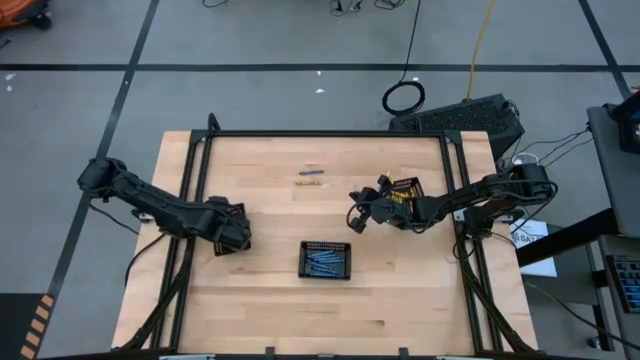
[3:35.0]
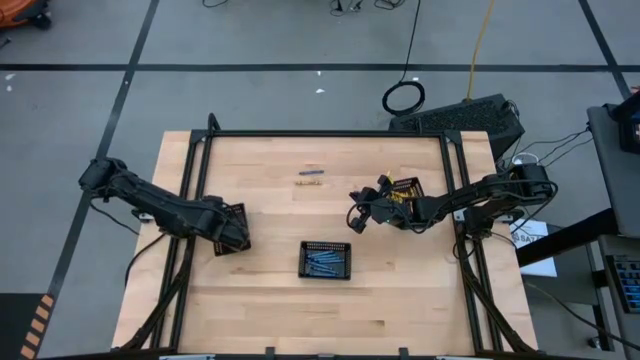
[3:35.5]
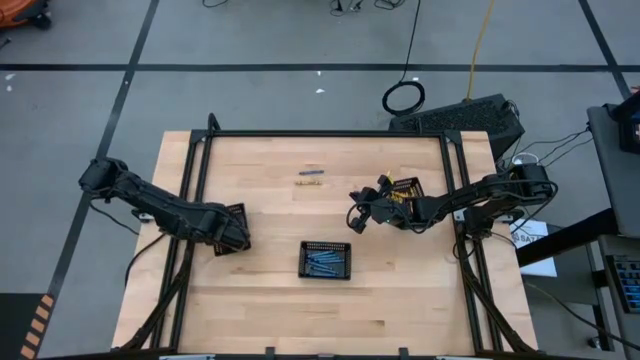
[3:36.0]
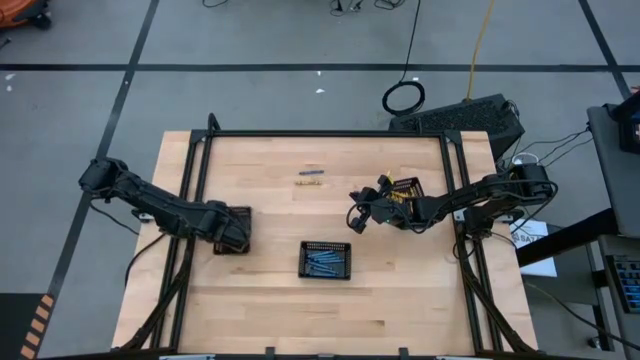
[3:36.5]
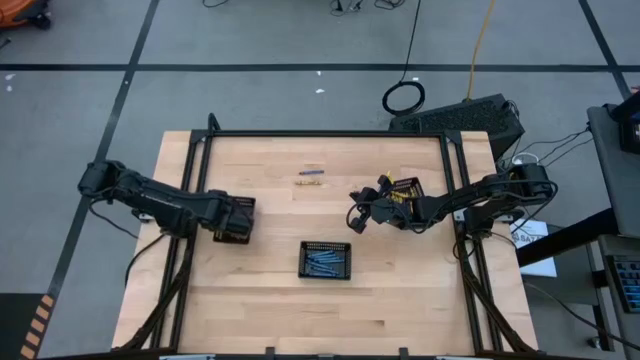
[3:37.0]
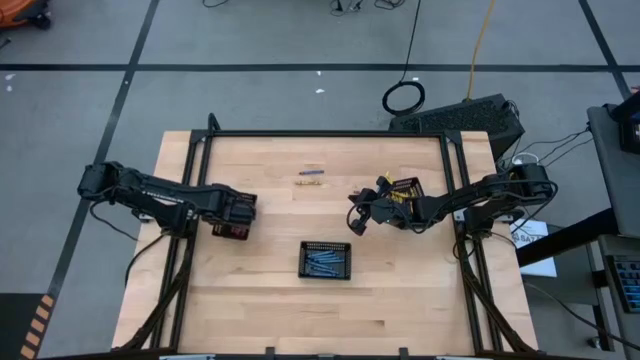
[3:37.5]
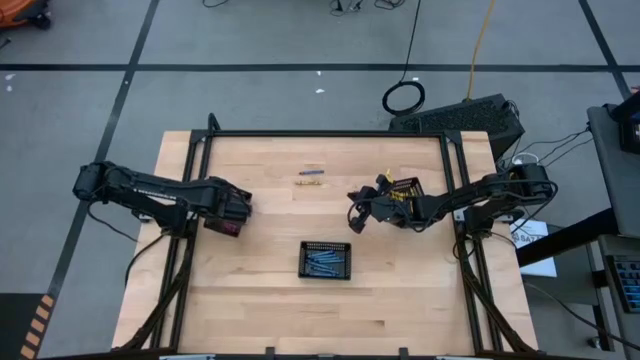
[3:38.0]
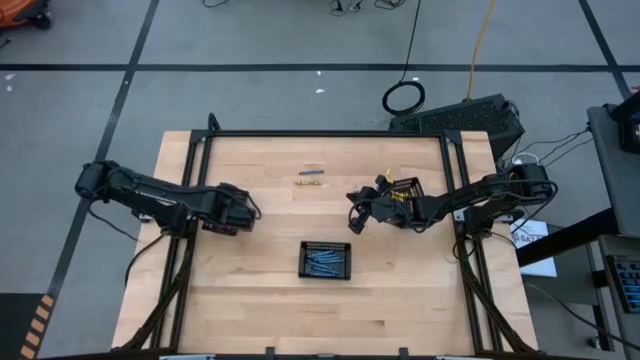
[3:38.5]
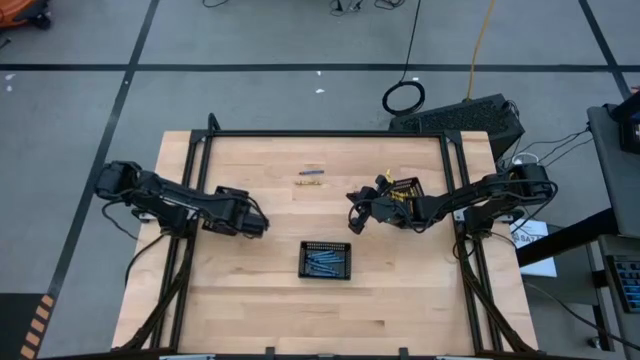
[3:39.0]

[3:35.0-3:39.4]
Task: Sort crayons
Adjust the left black basket

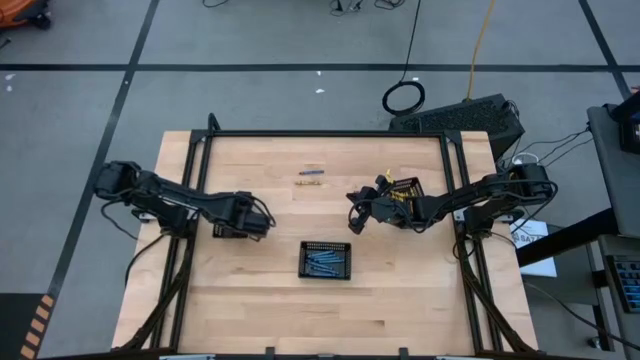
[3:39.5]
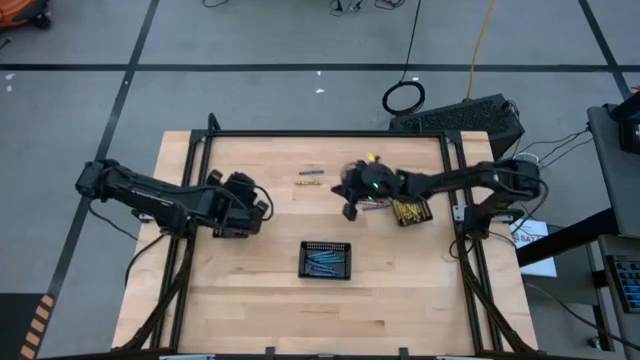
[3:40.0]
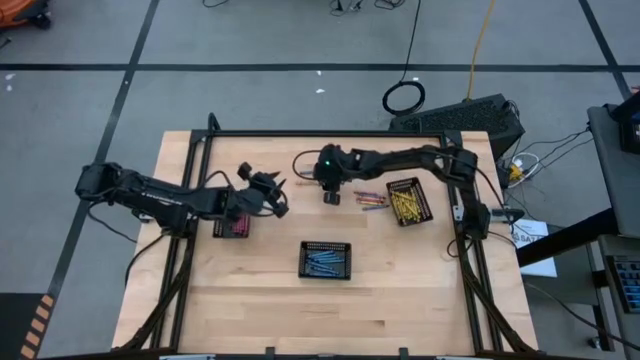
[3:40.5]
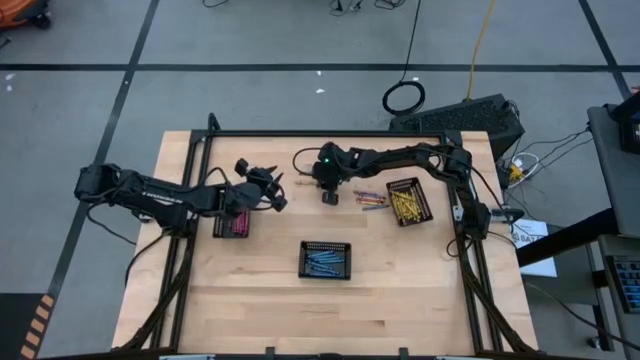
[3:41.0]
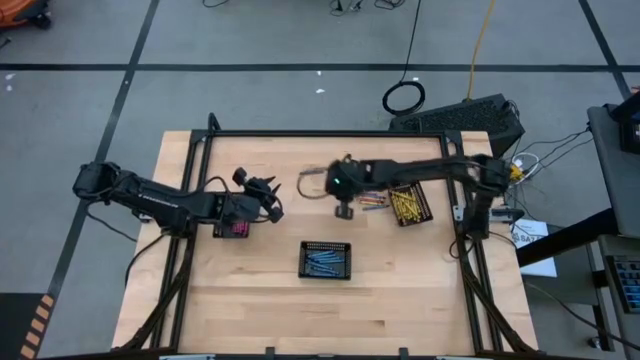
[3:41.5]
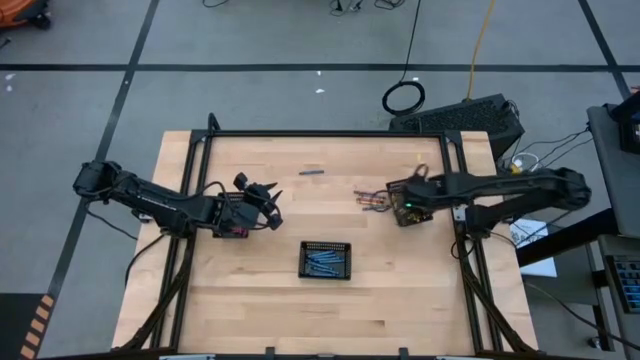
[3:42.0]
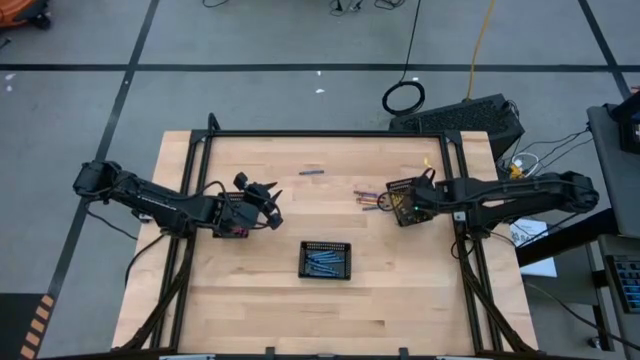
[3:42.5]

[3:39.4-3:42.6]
Put the yellow crayon into the right black basket

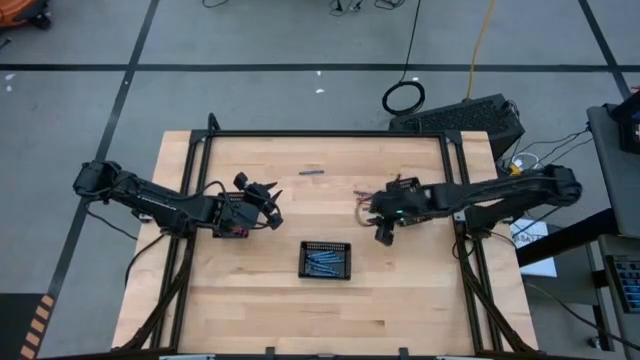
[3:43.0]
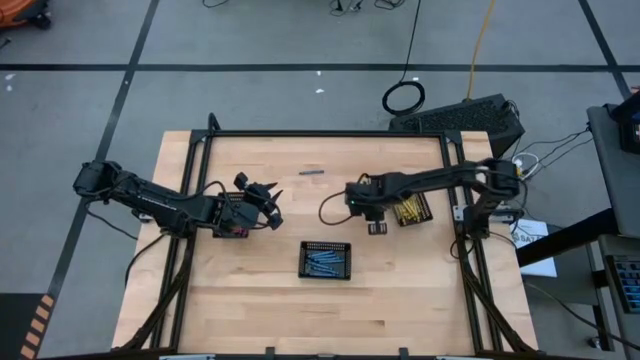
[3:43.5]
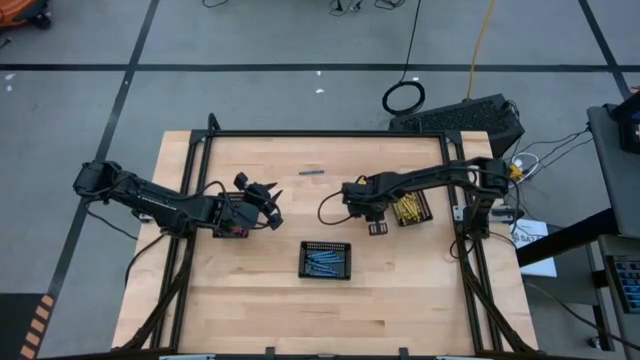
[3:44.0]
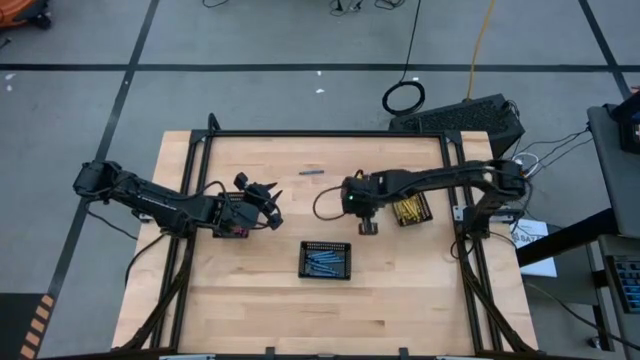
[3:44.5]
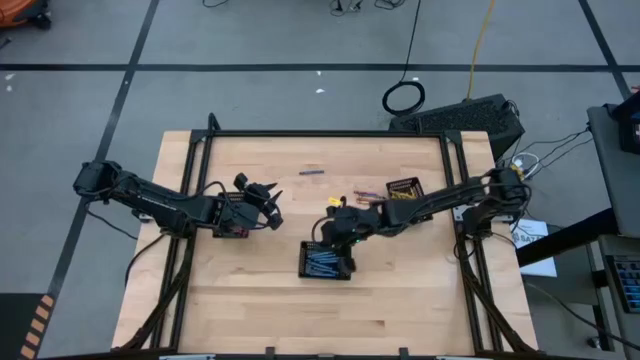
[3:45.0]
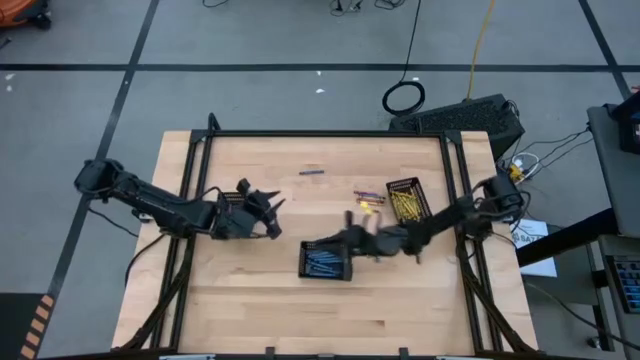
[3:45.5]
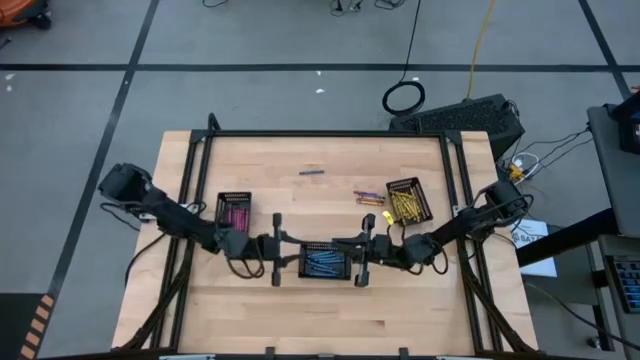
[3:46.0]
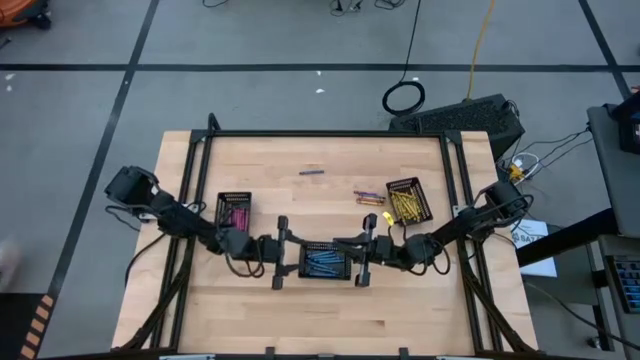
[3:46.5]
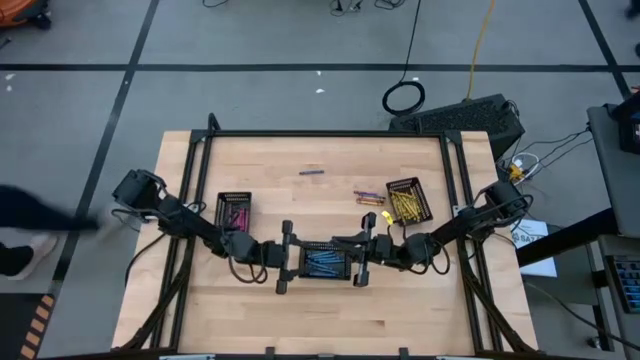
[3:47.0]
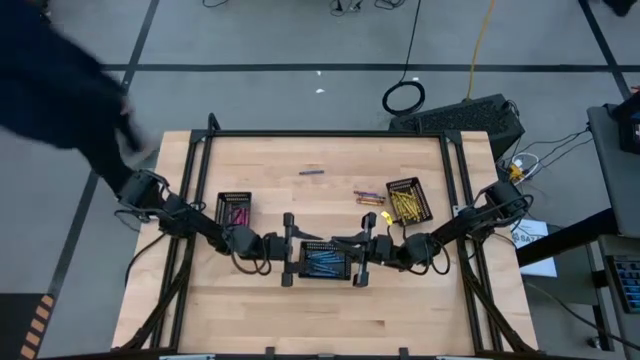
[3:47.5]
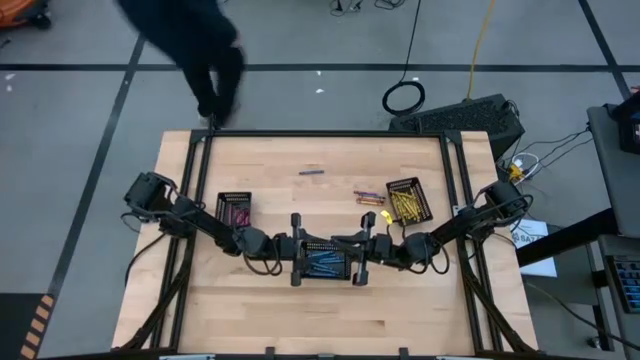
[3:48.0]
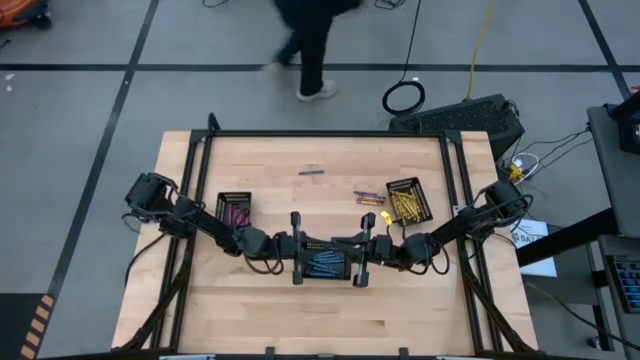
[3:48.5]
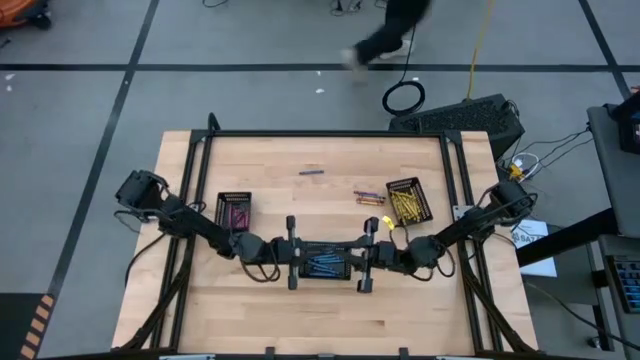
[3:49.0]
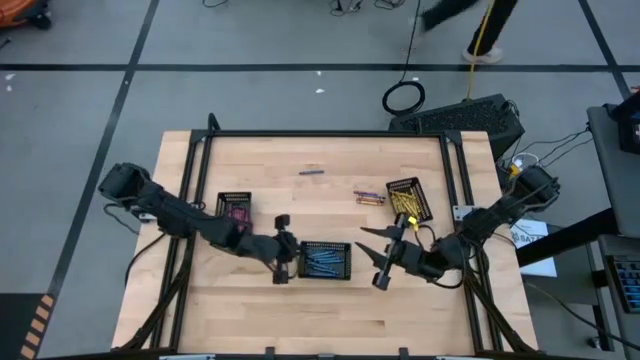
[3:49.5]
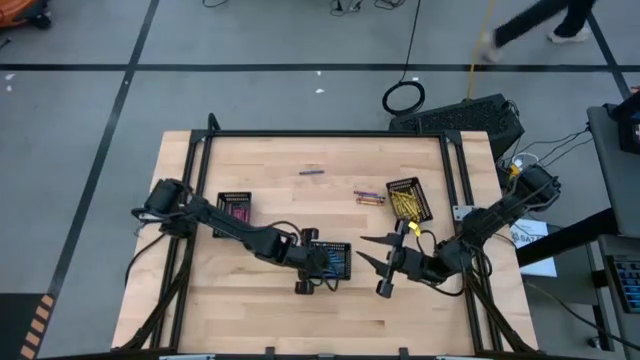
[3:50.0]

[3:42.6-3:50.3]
Put the blue crayon into the center black basket

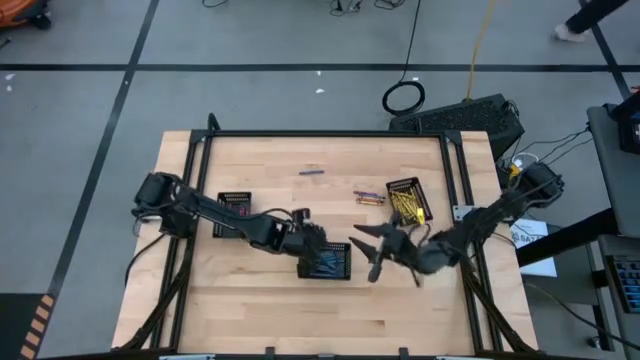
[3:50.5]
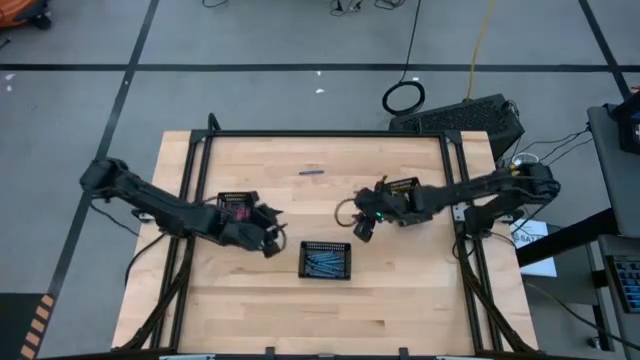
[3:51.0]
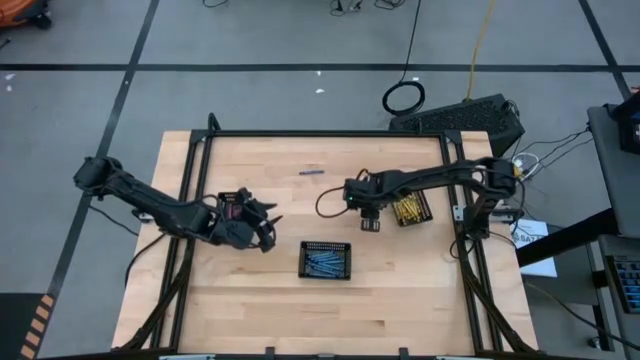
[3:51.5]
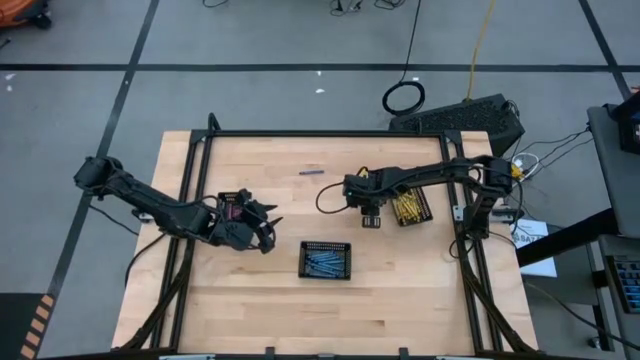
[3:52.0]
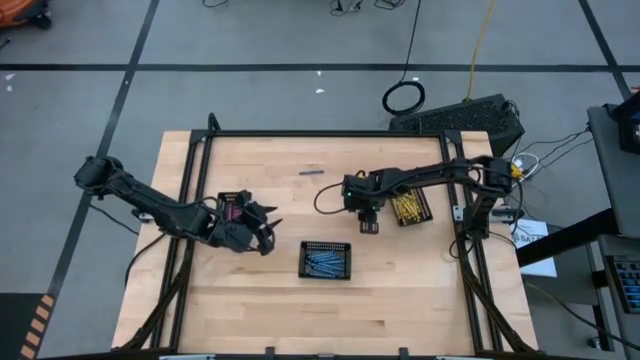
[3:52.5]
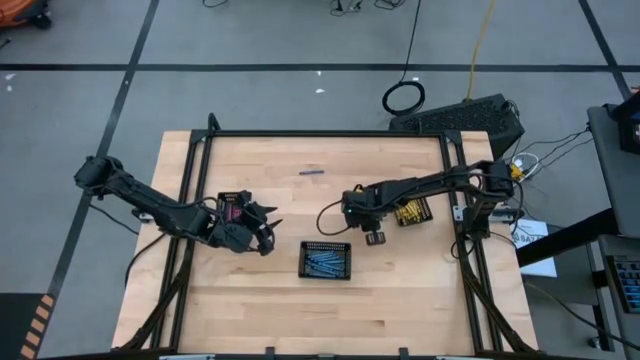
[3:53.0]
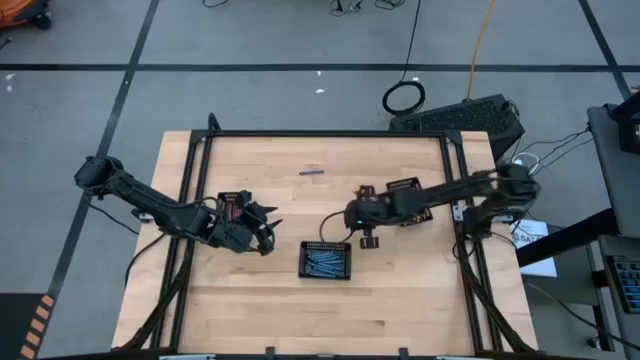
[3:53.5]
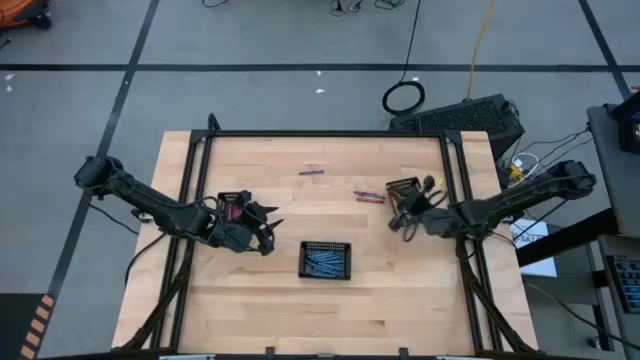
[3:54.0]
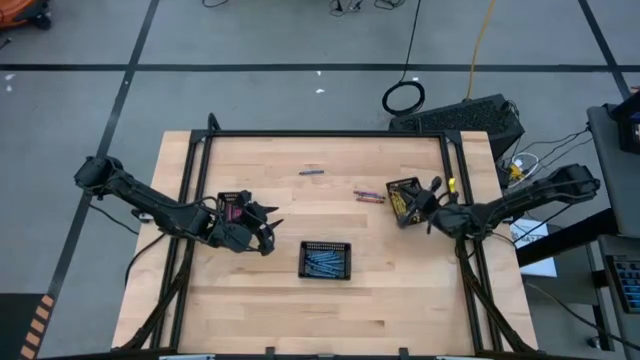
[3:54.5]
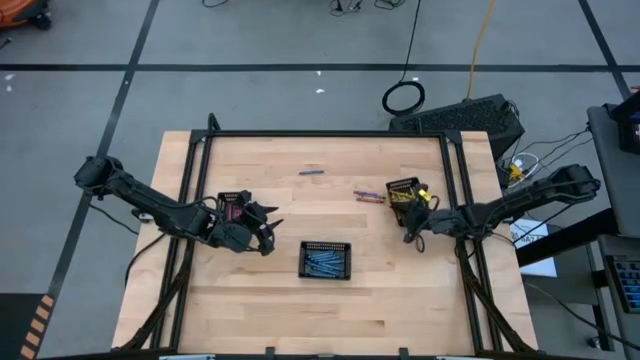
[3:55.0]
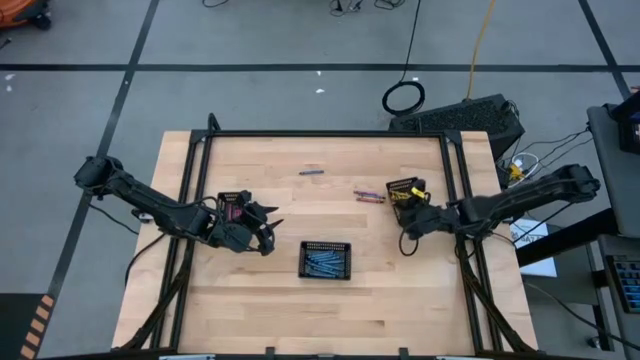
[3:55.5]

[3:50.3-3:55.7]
Put the yellow crayon into the right black basket

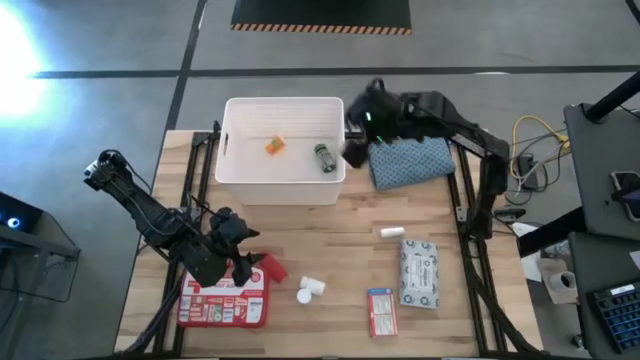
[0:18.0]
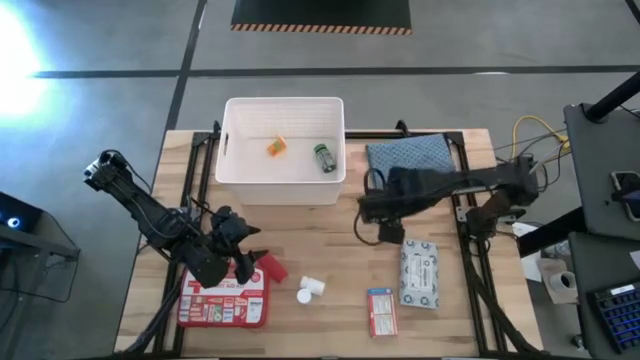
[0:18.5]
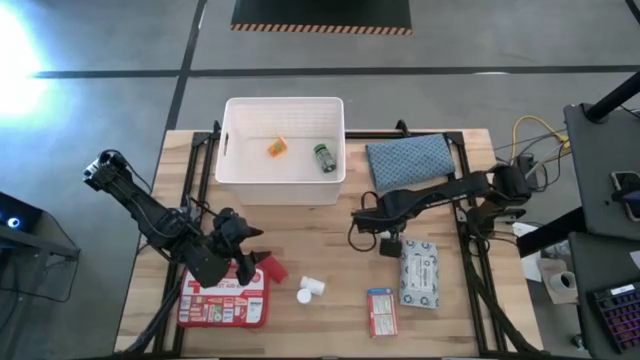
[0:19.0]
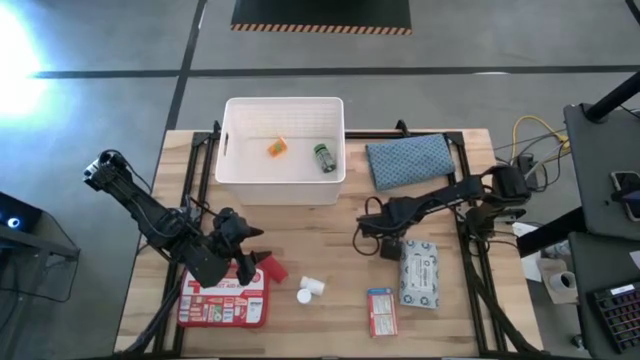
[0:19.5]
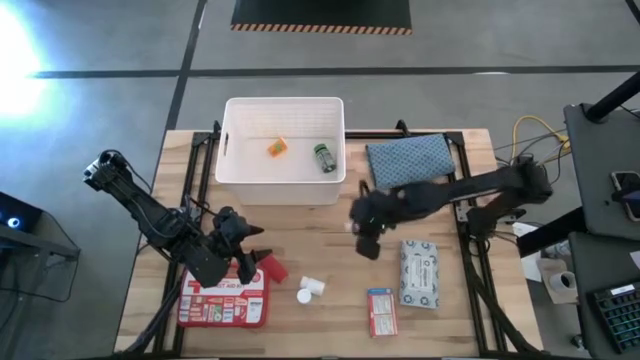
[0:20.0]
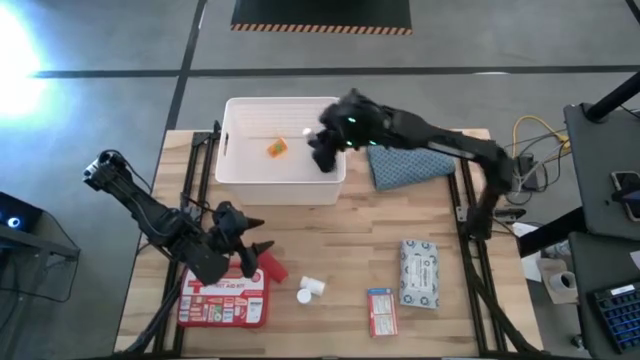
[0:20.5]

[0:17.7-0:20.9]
Task: Pick & place medical supplies in basket/bin
Put the white gauze into the white bin
